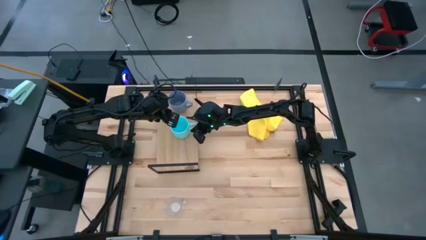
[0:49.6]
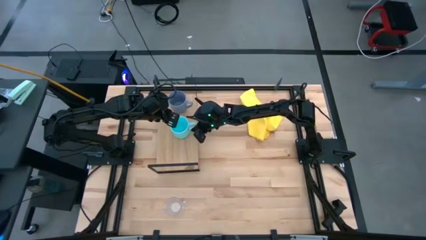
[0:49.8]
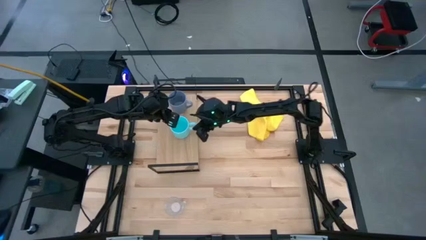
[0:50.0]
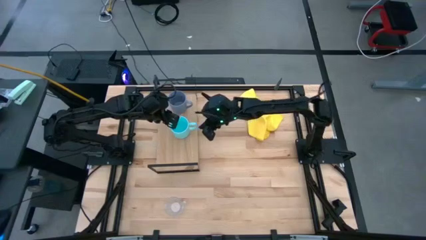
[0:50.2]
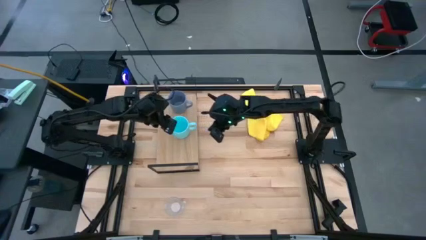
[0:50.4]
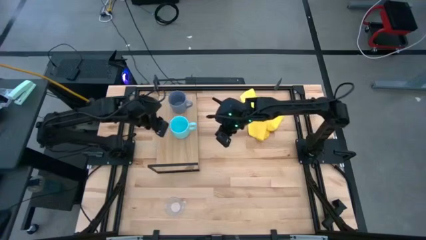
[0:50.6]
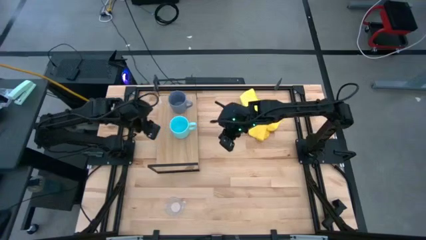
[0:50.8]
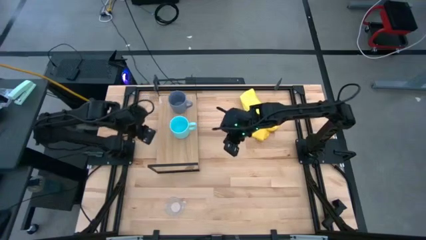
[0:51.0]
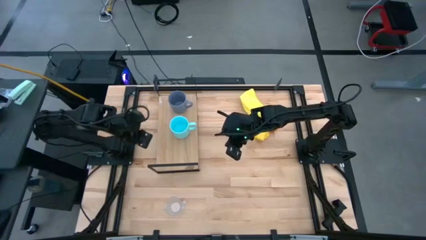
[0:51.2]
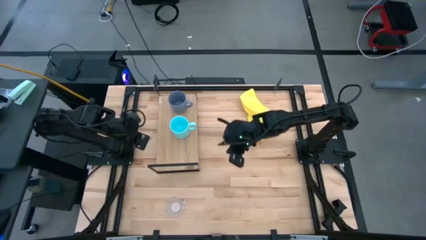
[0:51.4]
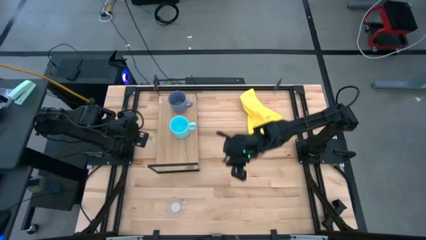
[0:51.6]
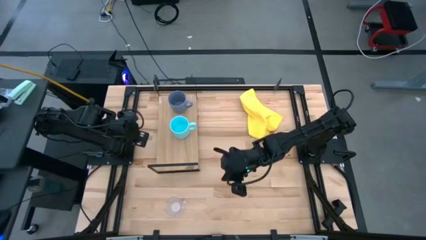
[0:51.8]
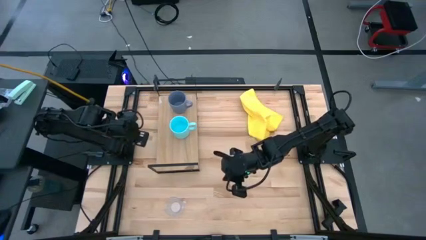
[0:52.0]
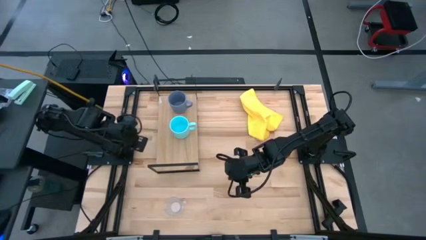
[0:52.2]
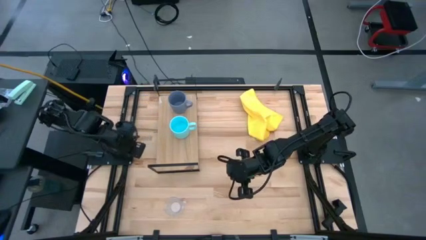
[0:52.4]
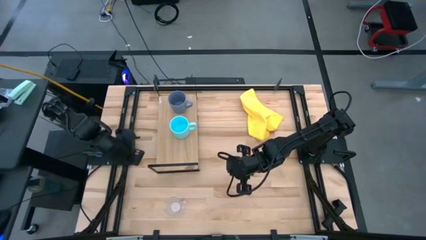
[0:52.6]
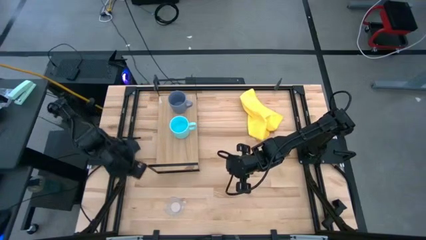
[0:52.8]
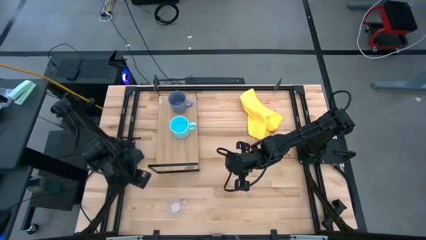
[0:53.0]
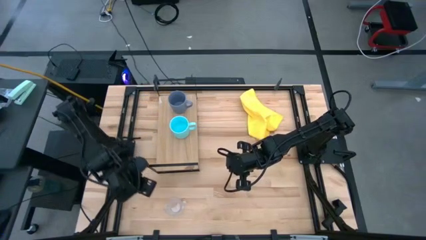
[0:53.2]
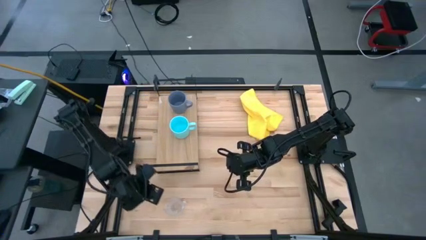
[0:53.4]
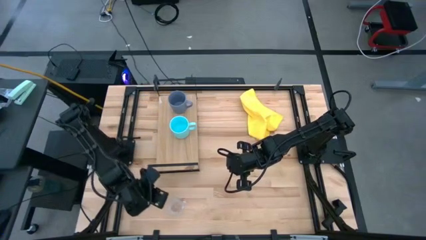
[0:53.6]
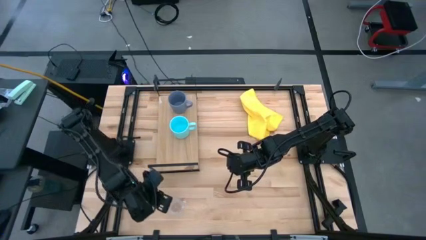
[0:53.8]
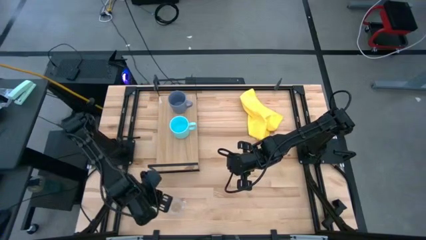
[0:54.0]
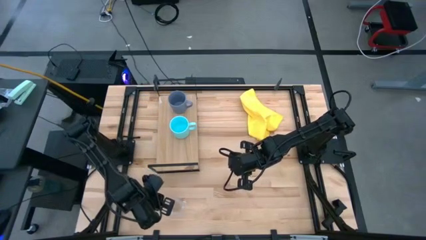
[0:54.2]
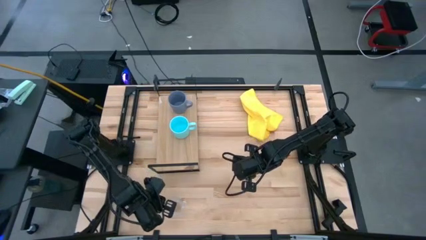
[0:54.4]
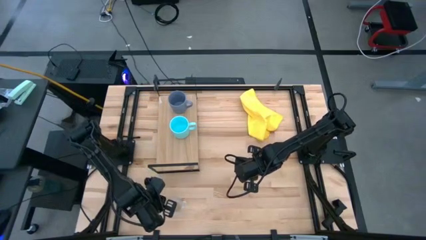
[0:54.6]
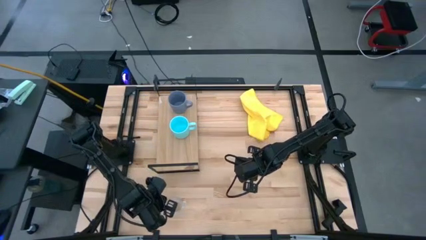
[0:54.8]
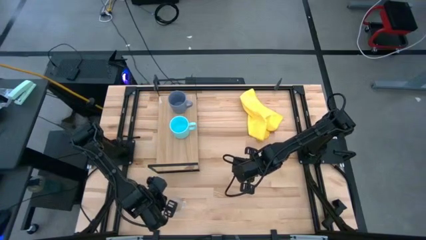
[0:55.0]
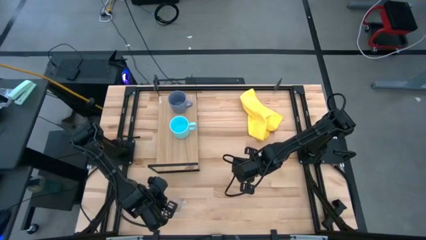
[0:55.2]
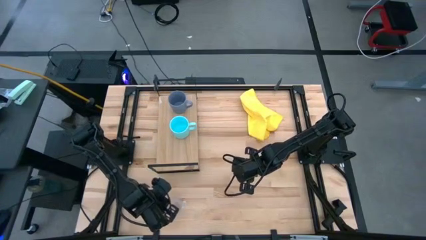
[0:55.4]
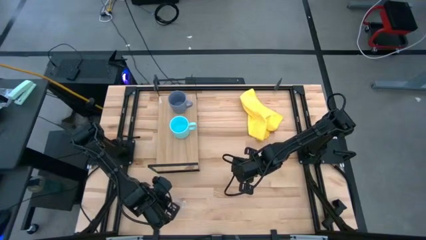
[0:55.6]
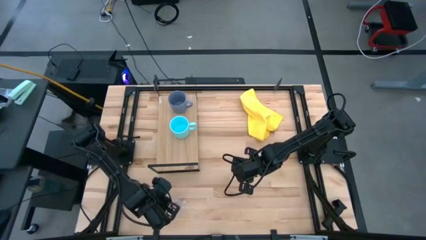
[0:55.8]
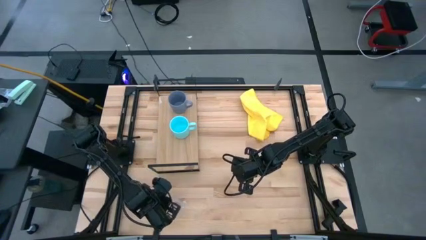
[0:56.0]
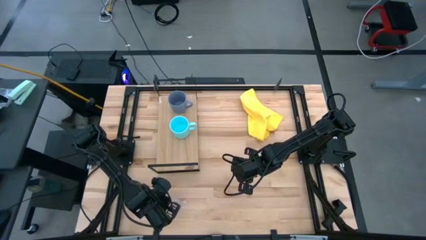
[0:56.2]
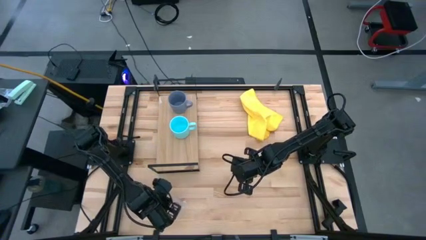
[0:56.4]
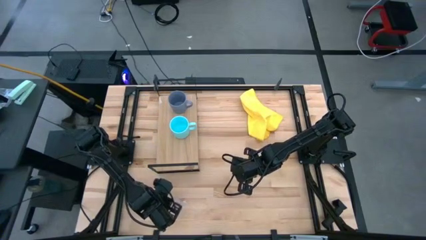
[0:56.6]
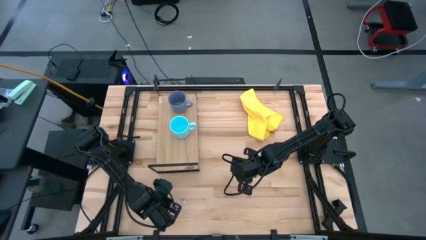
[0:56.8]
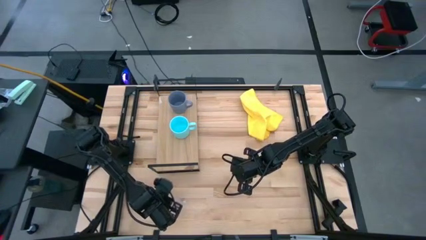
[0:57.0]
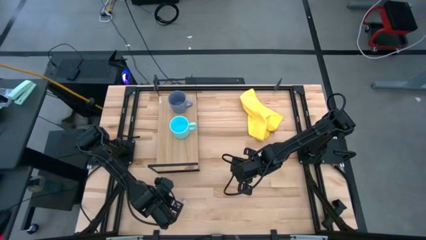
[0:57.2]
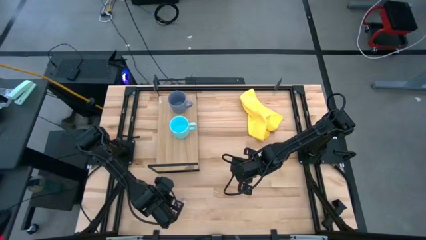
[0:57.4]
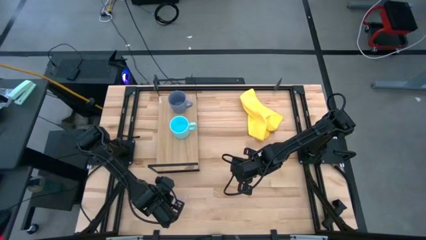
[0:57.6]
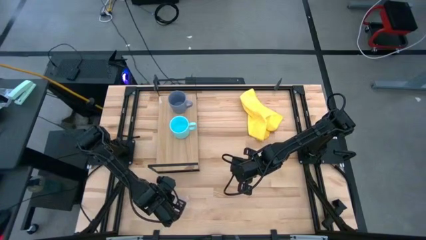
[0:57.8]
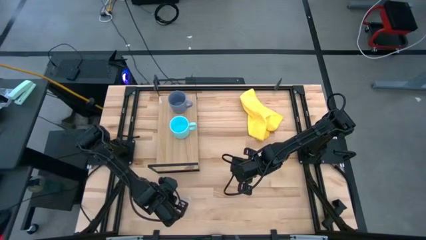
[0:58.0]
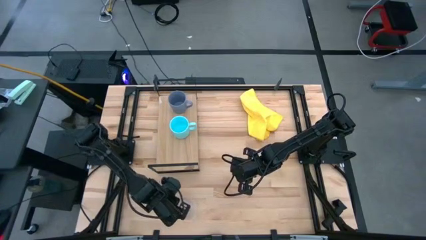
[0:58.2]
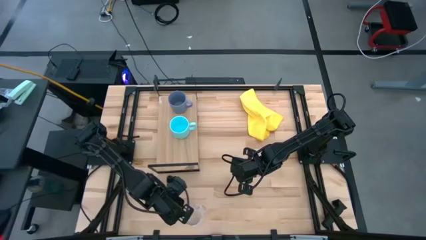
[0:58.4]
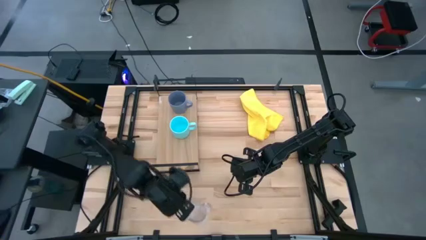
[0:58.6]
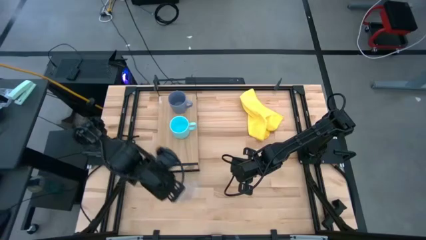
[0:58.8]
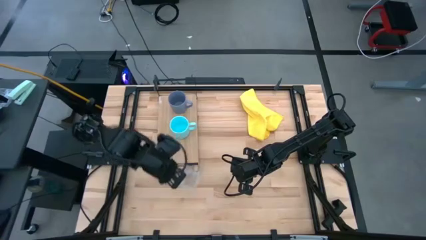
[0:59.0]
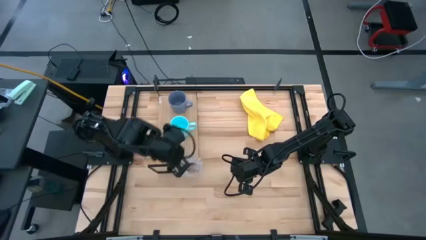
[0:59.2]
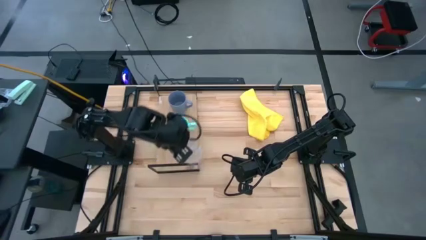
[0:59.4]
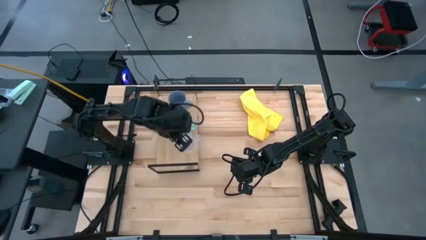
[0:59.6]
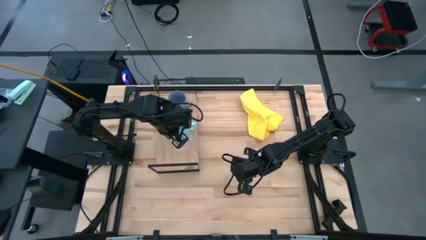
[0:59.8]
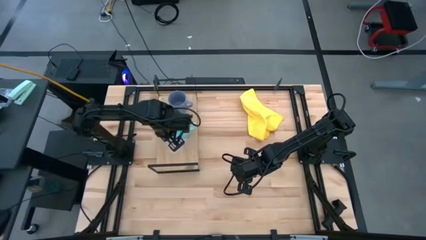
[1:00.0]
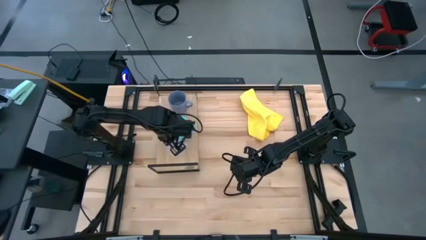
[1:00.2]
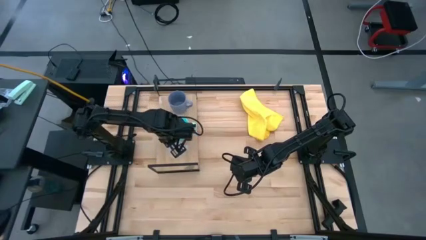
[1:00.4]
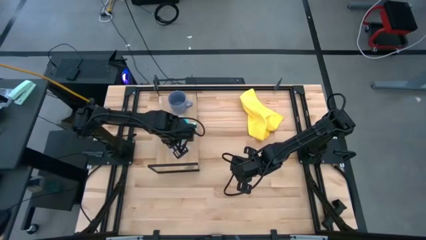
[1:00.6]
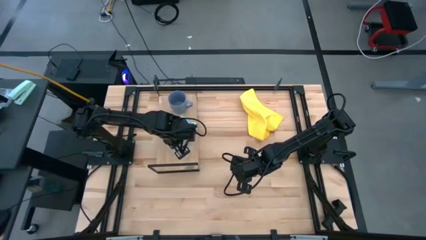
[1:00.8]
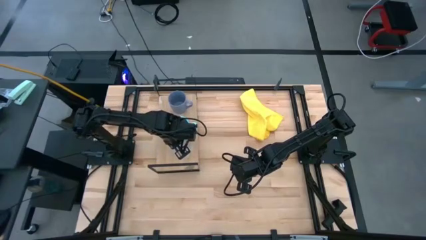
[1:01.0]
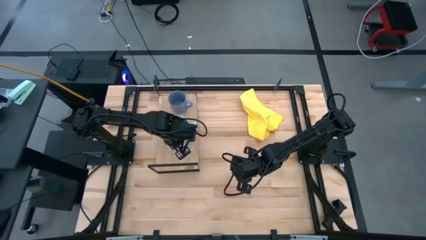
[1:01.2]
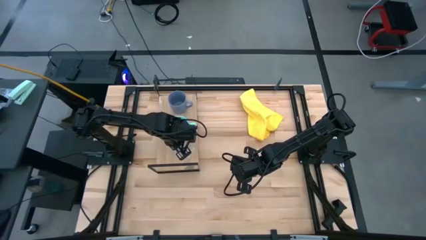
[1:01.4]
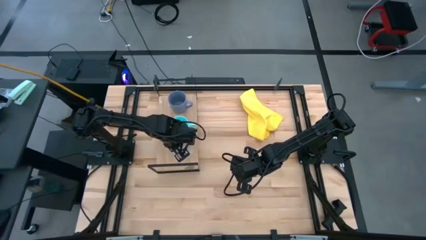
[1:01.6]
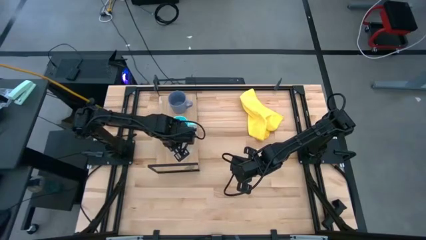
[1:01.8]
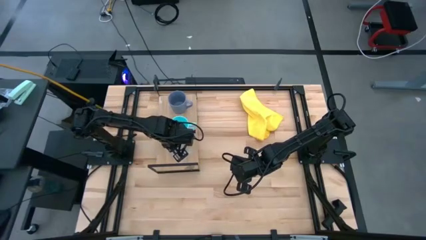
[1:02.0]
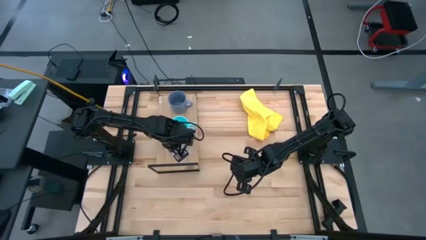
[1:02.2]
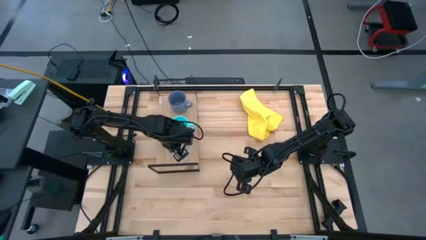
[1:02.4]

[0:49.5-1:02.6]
Task: Stack small to large cups/mugs on shelf
Put the transparent mug on the shelf
